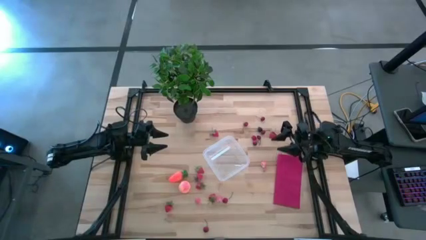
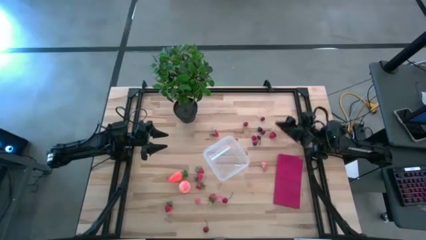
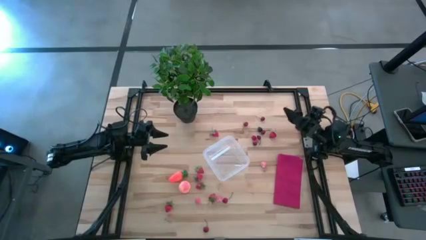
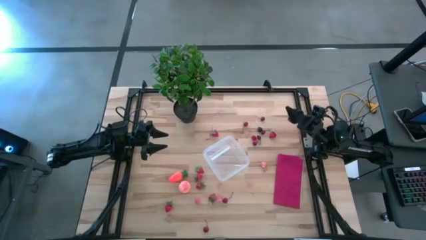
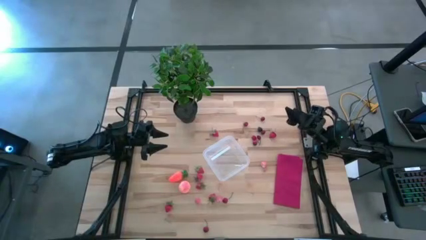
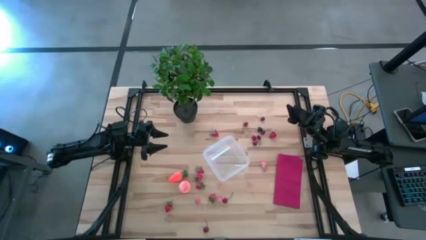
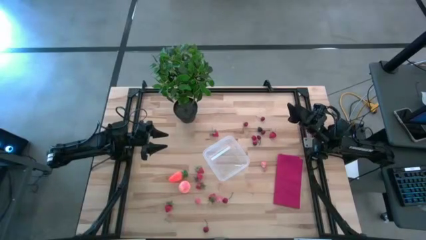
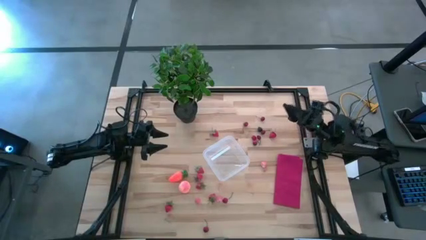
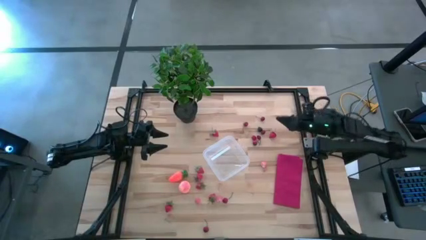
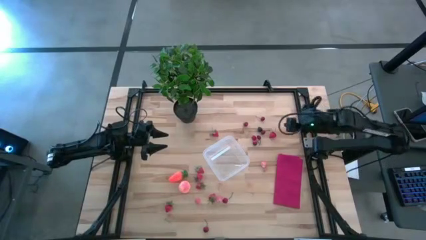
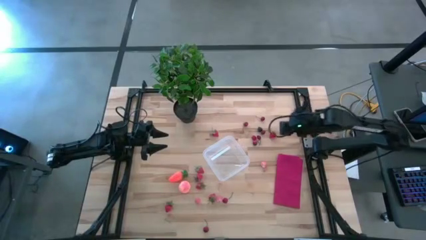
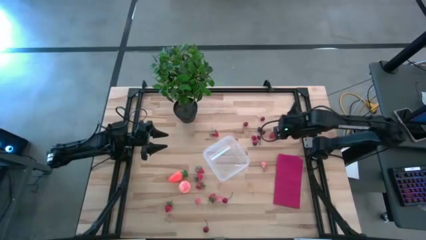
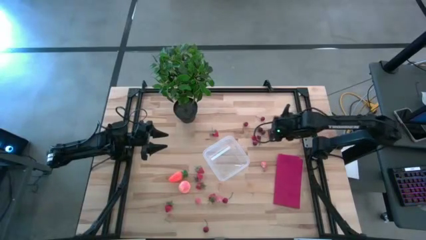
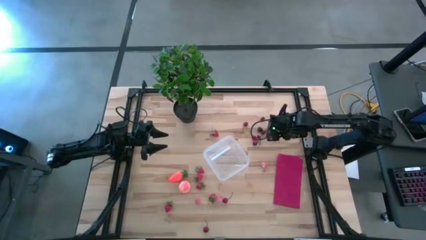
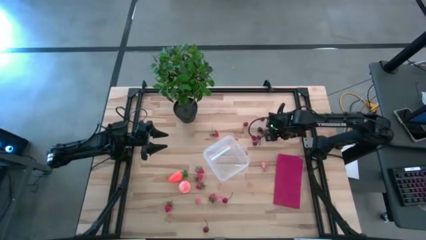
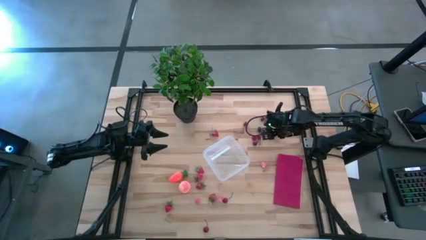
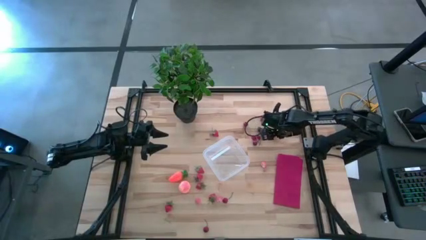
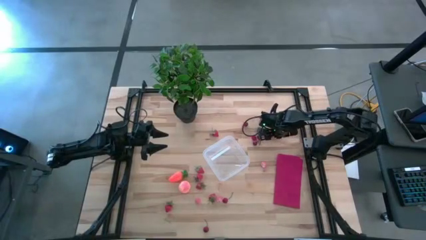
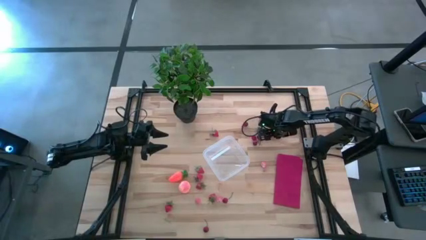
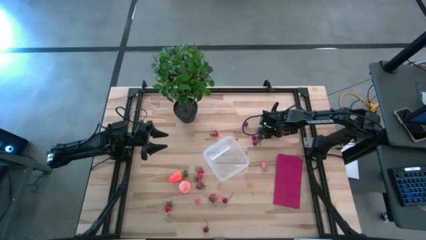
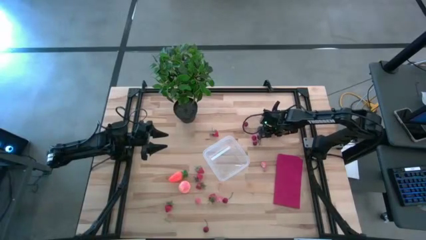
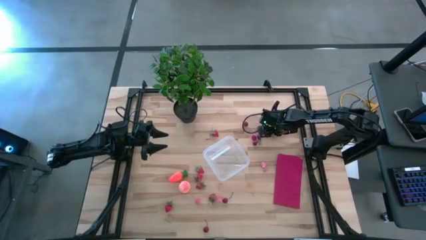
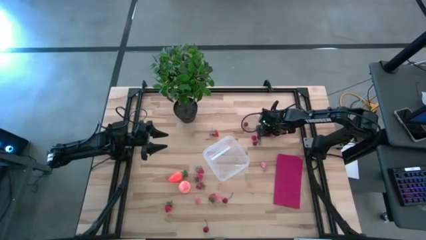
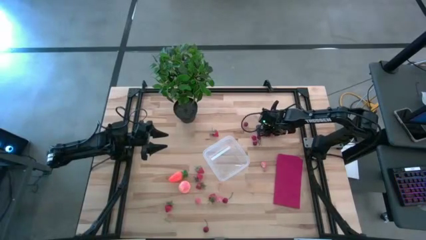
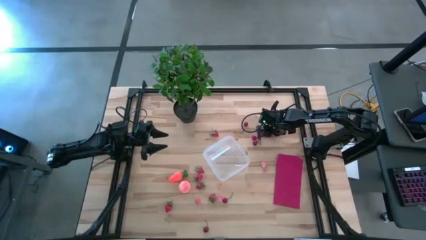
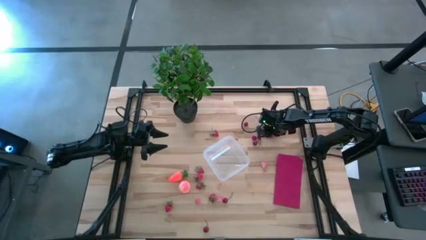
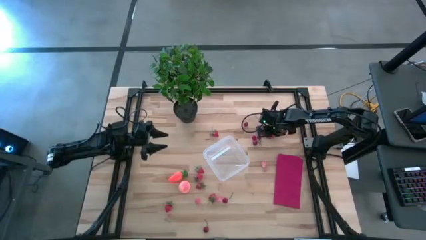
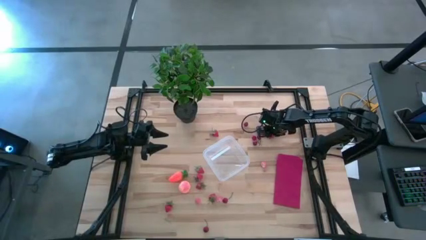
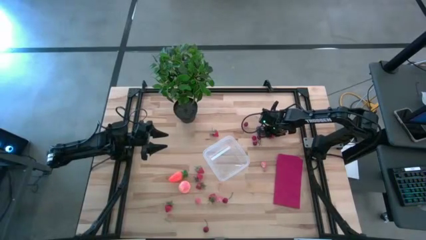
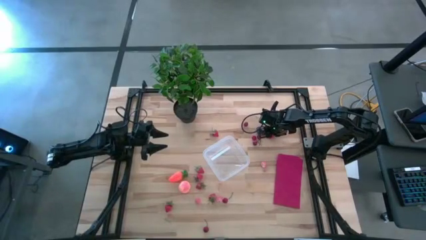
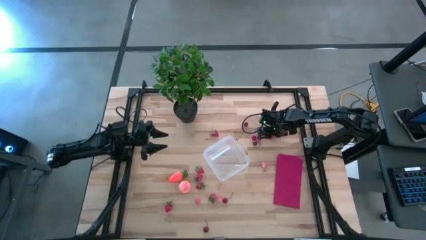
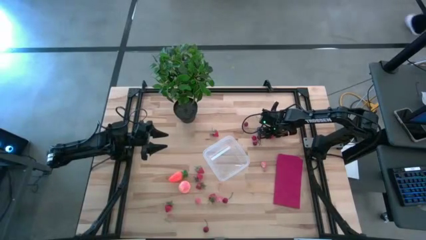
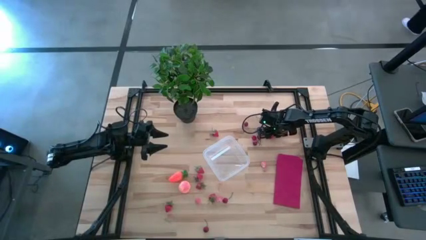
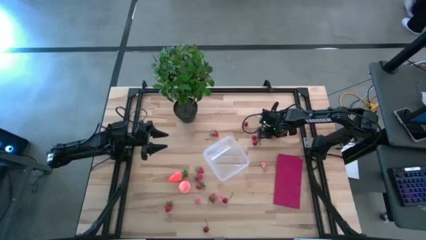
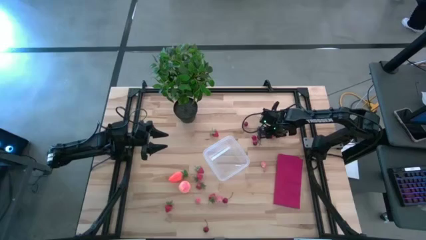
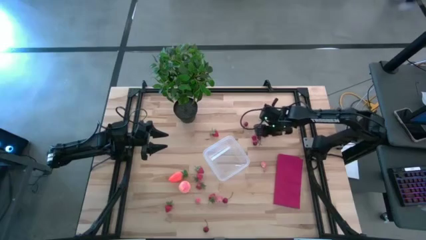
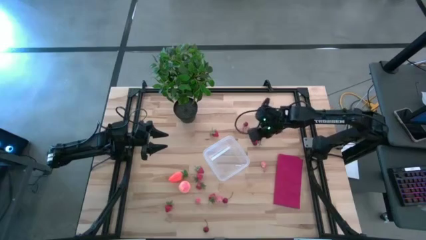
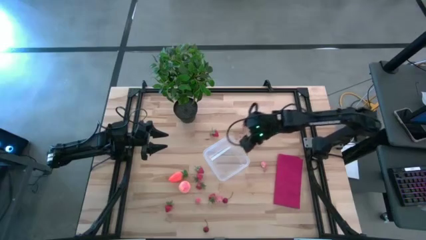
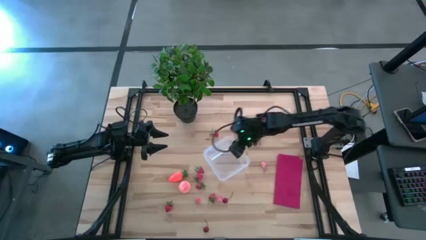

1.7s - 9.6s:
Task: Pick and placing Produce into tupperware
Put the red strawberry into the transparent bin

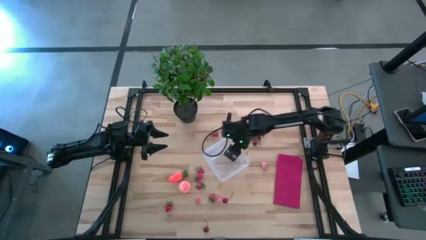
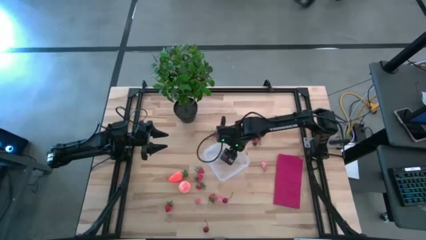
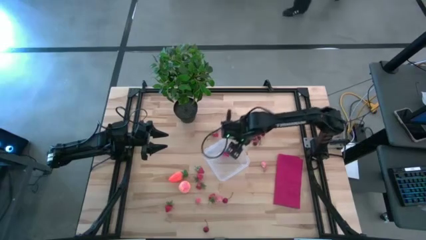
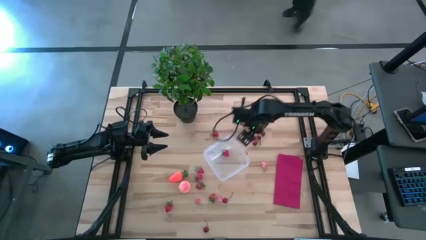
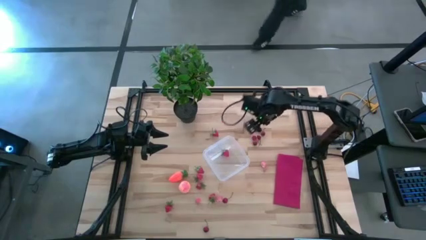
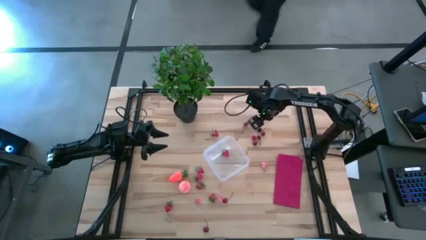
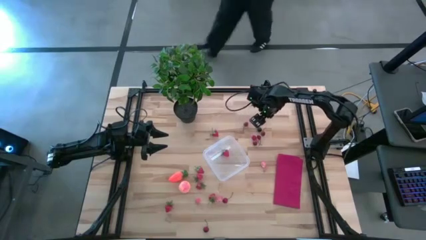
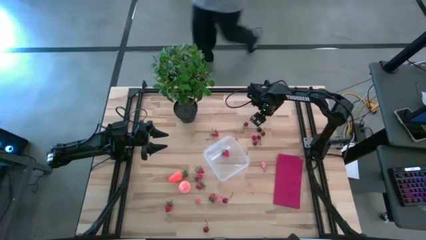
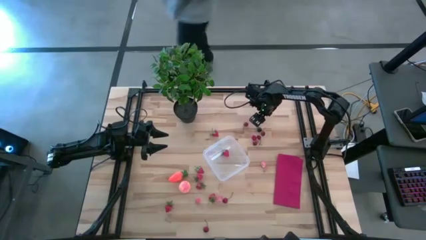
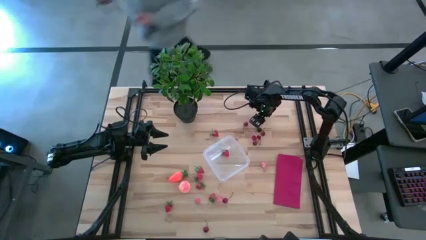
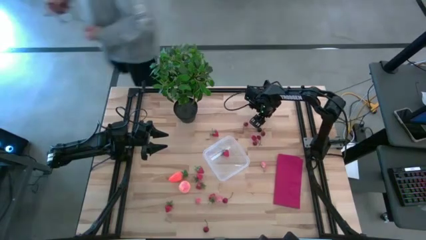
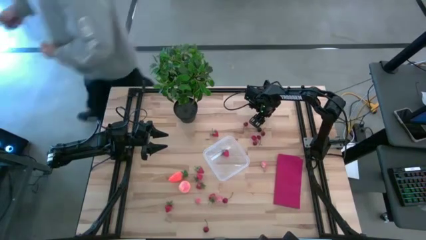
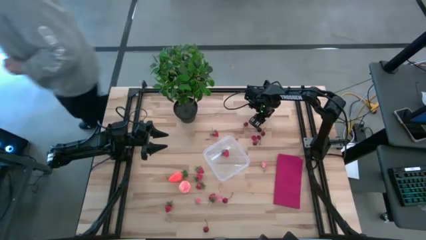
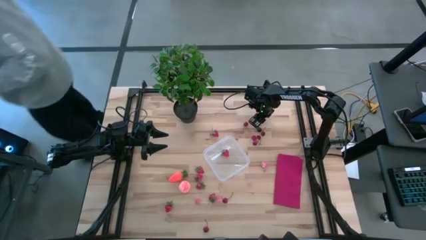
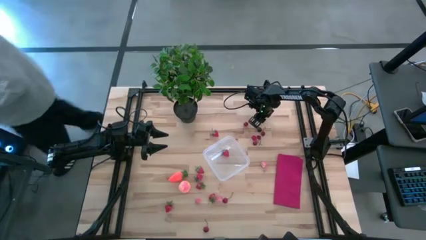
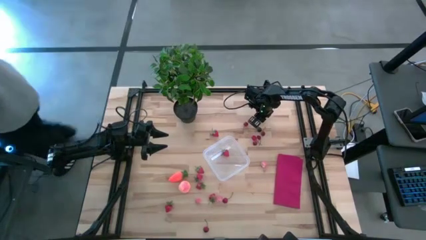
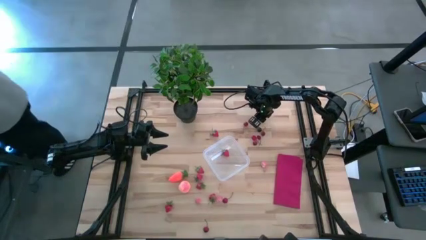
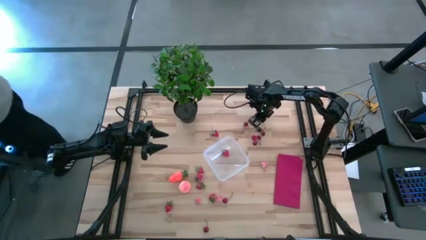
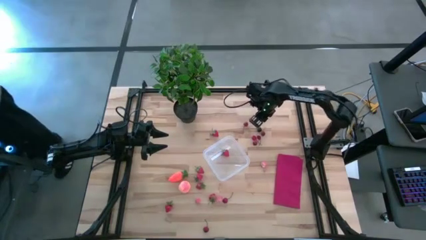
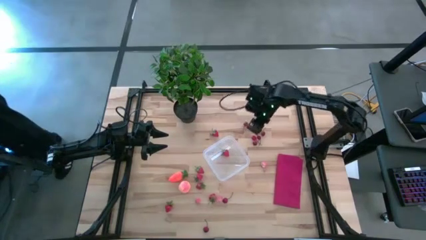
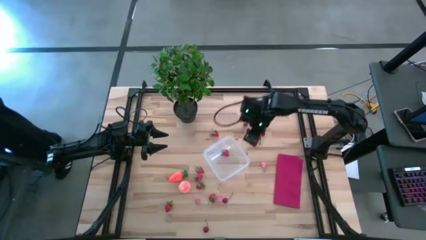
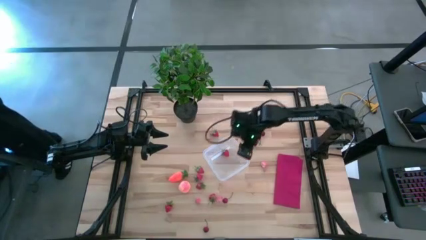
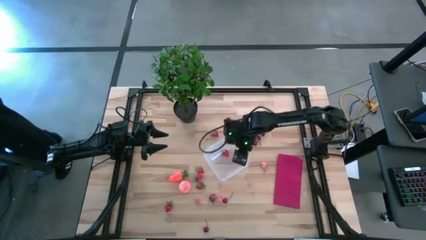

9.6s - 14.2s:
Put the red cherry into the transparent bin

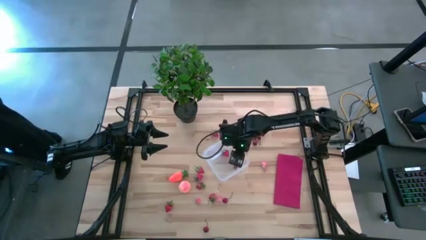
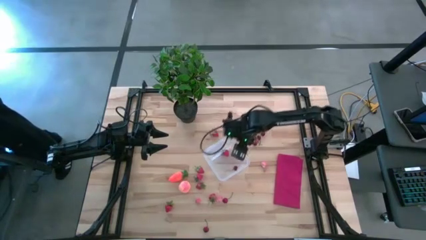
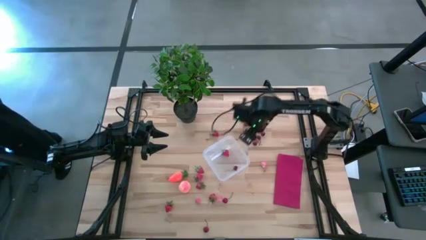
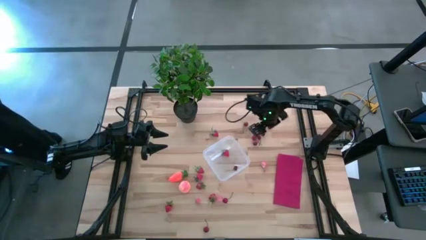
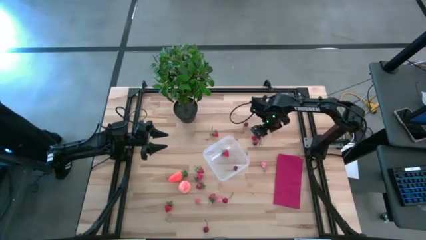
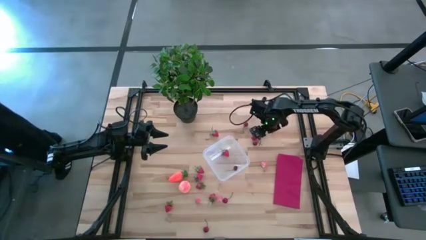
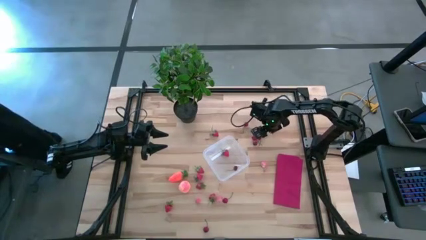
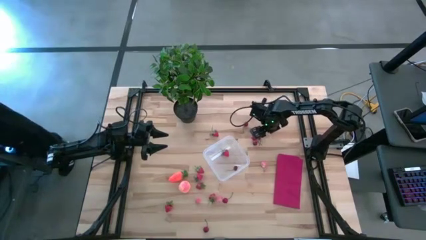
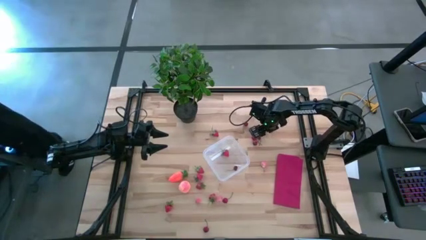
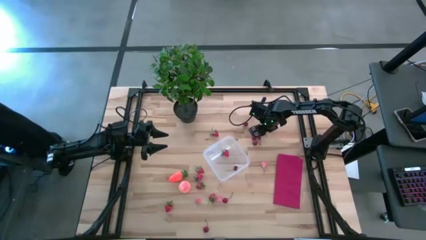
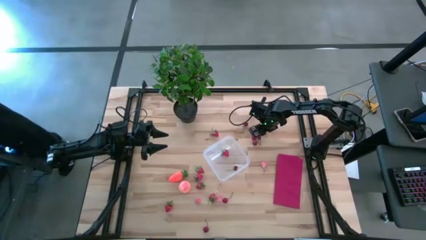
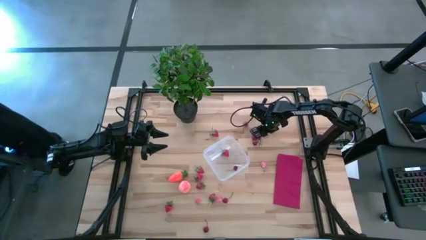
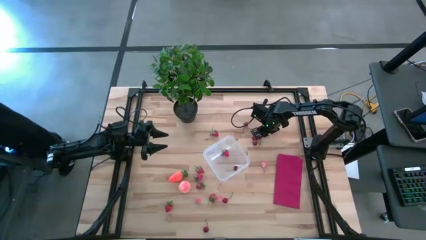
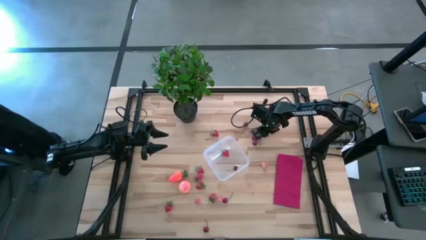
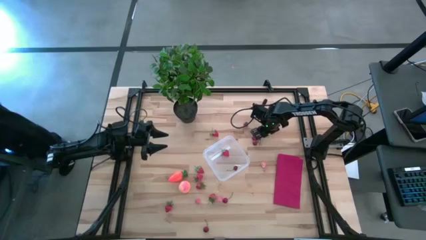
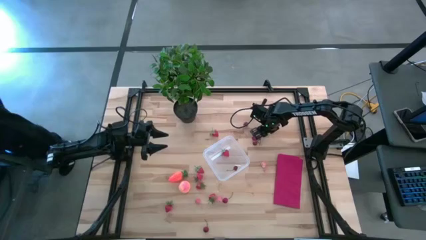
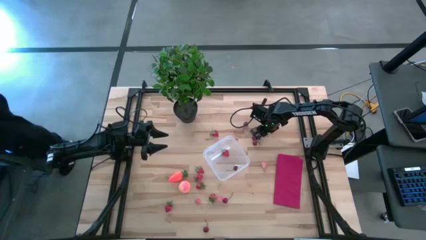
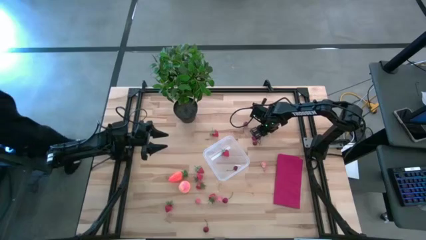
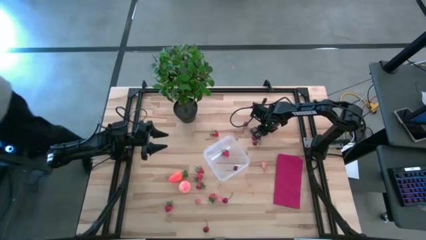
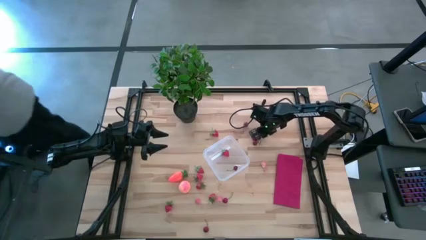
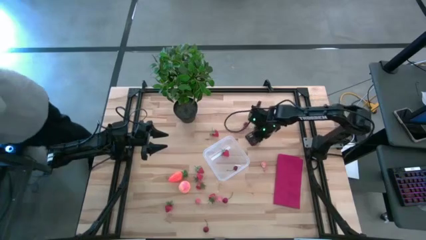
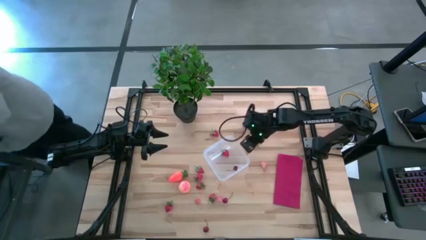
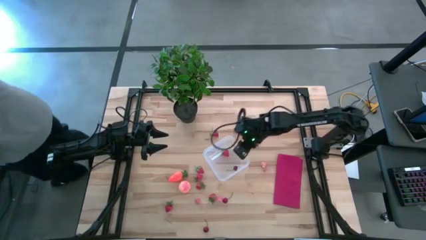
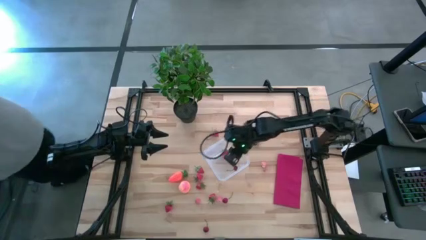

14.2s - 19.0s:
Put the red cherry into the transparent bin
